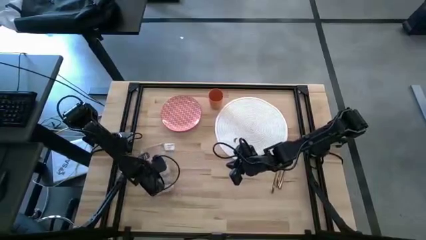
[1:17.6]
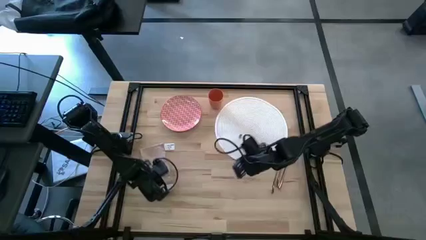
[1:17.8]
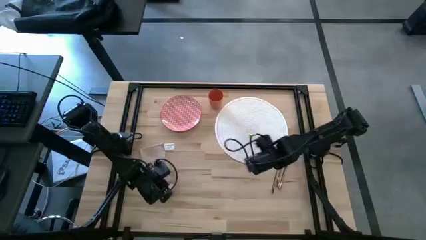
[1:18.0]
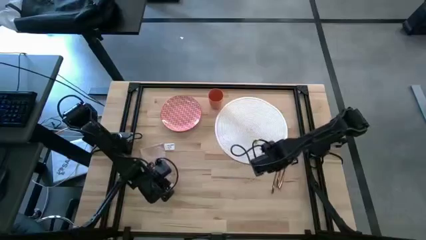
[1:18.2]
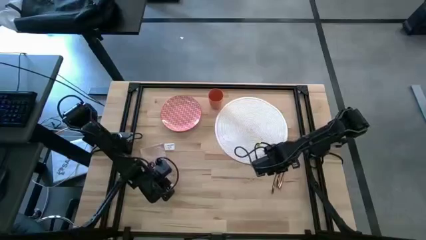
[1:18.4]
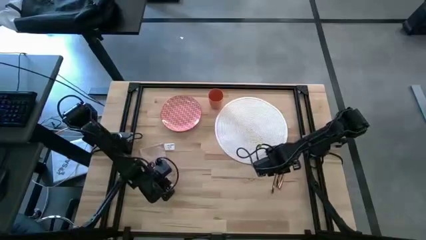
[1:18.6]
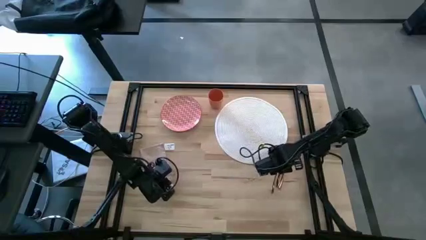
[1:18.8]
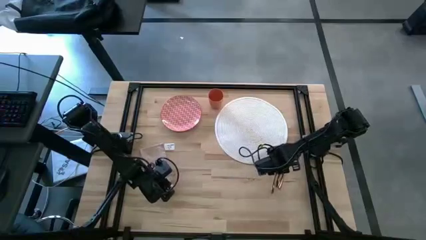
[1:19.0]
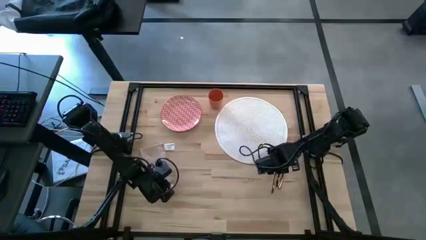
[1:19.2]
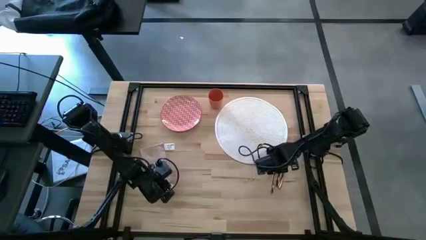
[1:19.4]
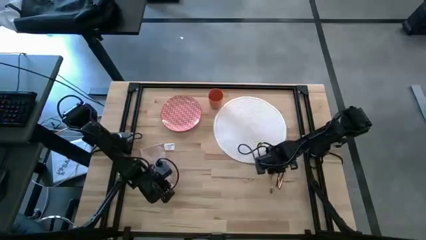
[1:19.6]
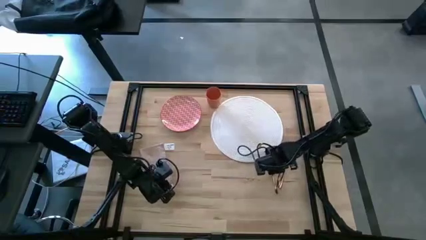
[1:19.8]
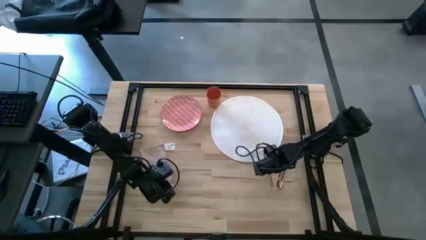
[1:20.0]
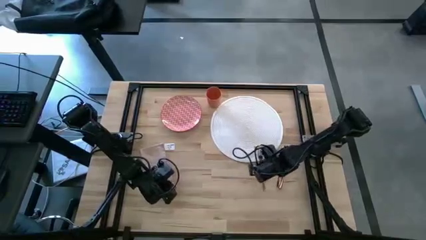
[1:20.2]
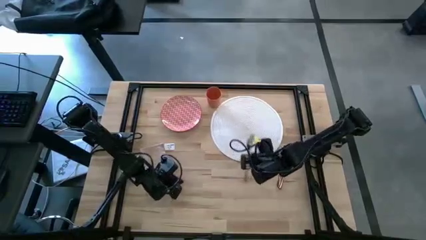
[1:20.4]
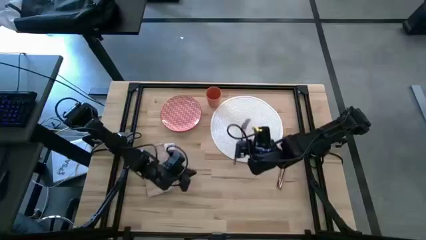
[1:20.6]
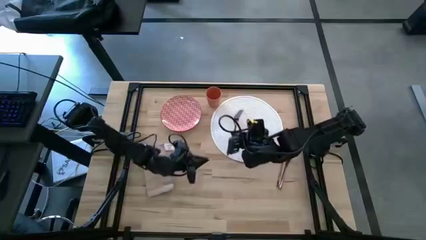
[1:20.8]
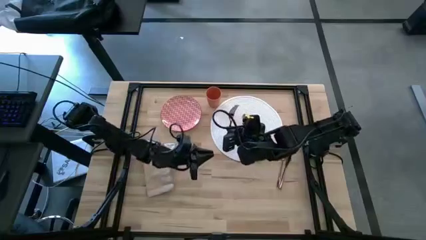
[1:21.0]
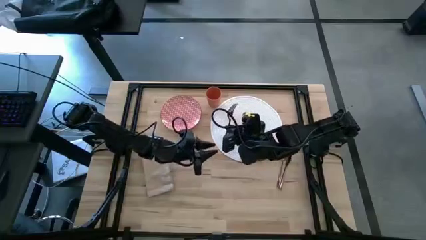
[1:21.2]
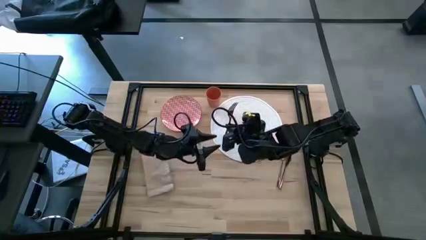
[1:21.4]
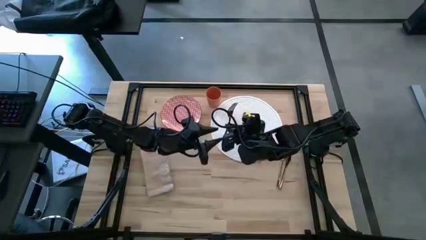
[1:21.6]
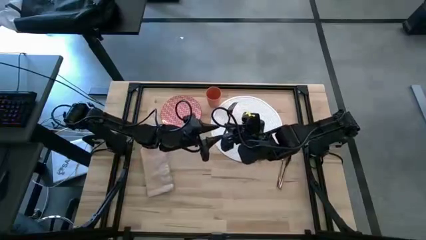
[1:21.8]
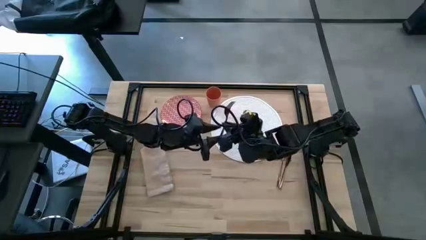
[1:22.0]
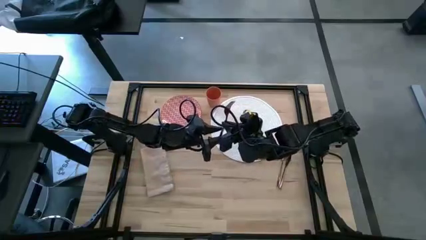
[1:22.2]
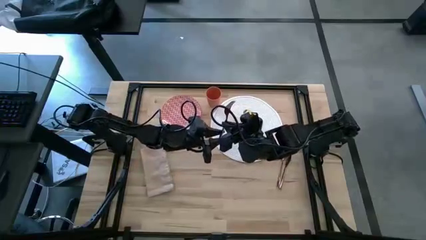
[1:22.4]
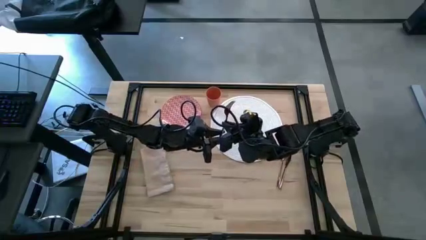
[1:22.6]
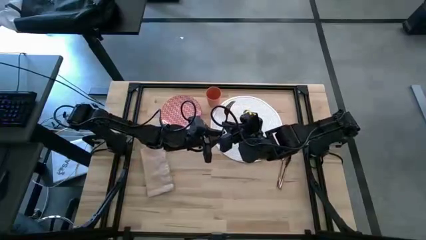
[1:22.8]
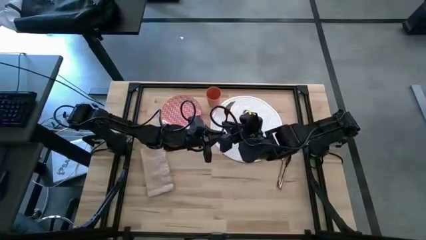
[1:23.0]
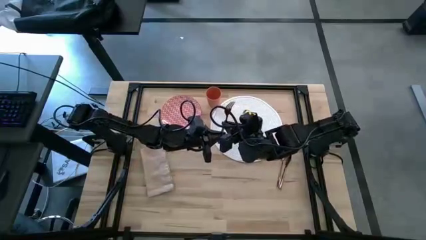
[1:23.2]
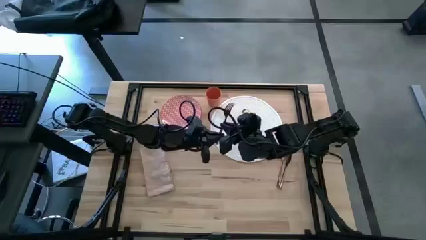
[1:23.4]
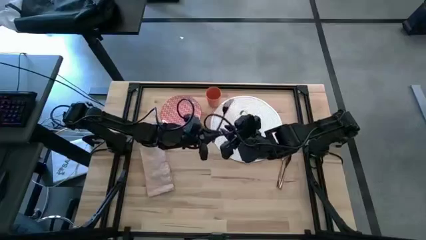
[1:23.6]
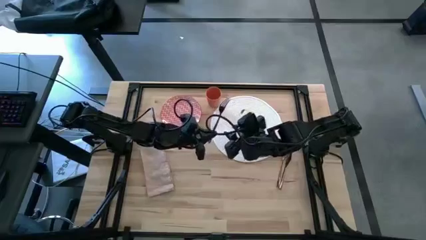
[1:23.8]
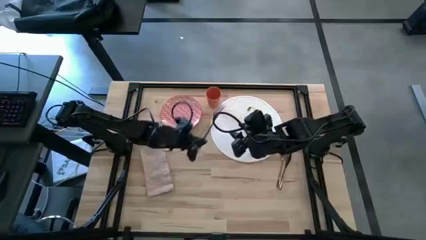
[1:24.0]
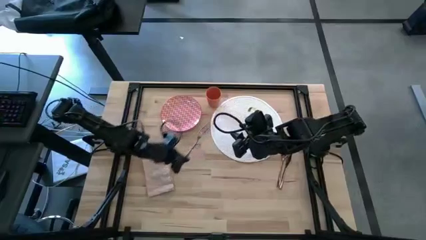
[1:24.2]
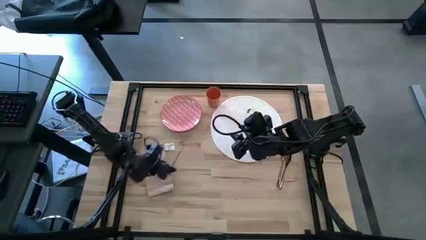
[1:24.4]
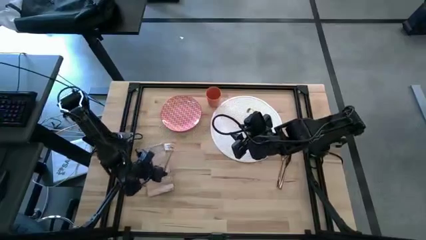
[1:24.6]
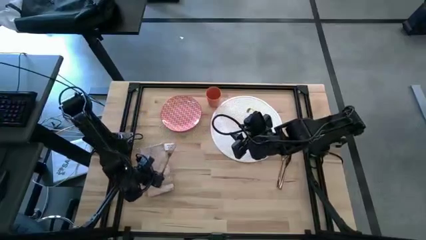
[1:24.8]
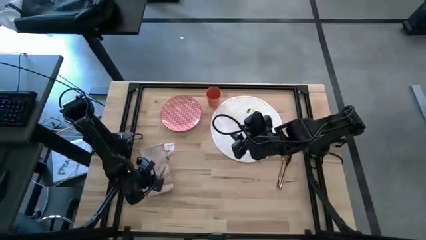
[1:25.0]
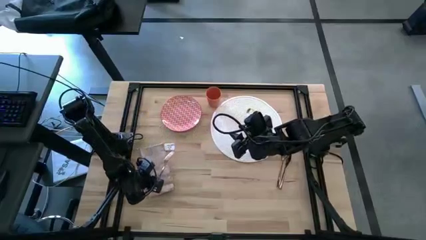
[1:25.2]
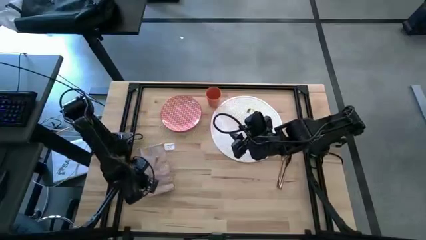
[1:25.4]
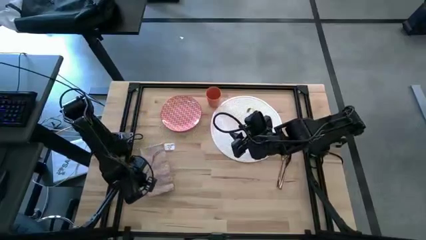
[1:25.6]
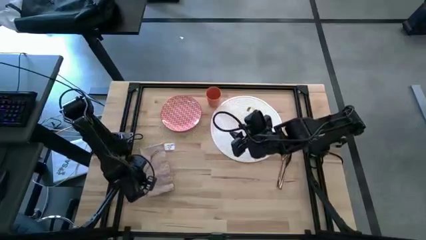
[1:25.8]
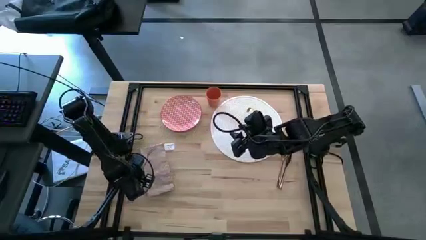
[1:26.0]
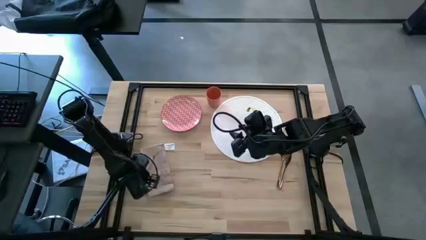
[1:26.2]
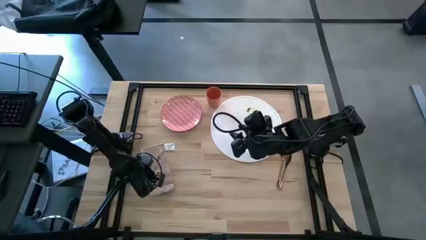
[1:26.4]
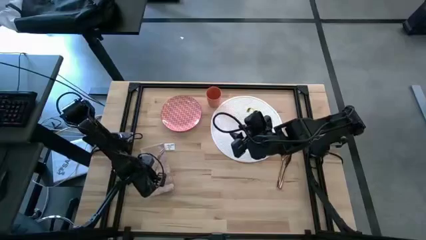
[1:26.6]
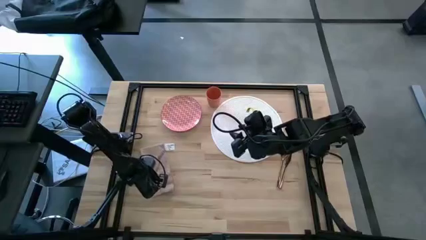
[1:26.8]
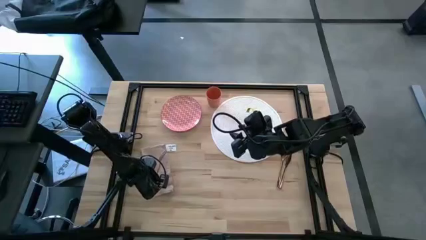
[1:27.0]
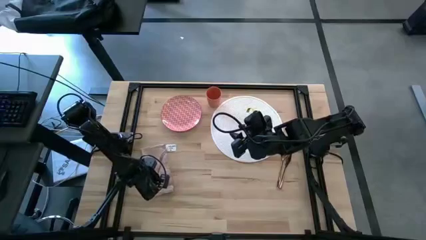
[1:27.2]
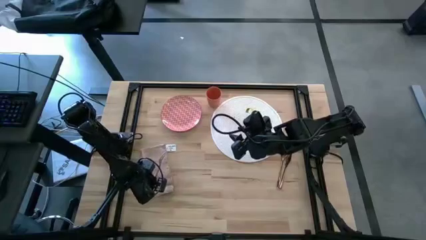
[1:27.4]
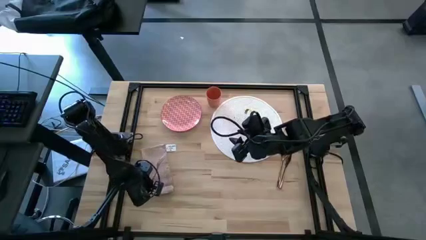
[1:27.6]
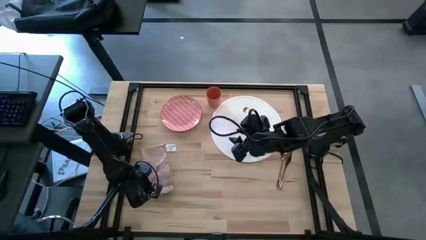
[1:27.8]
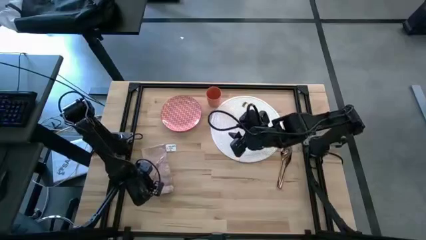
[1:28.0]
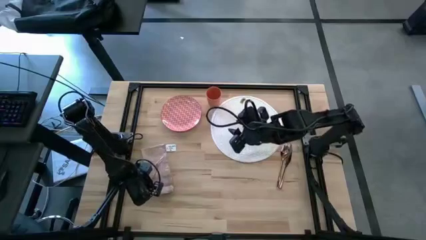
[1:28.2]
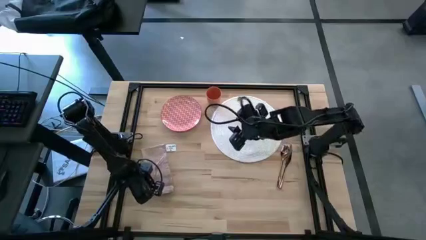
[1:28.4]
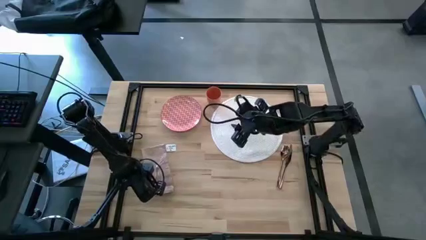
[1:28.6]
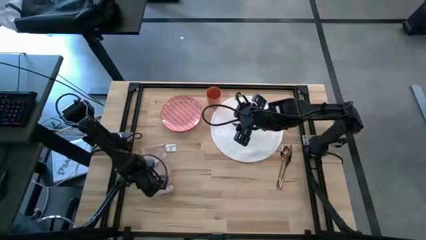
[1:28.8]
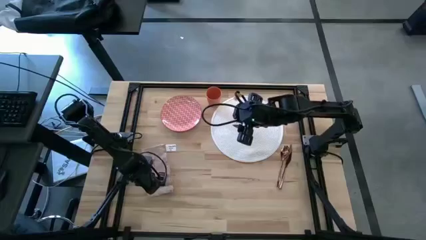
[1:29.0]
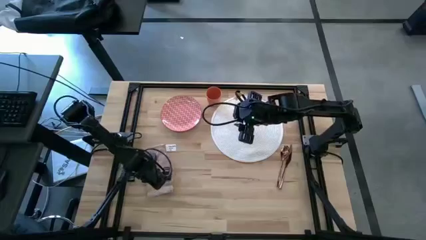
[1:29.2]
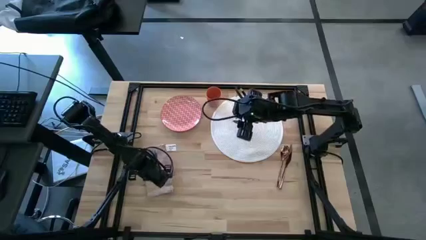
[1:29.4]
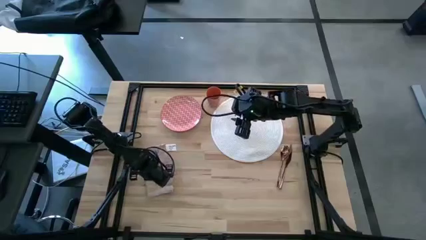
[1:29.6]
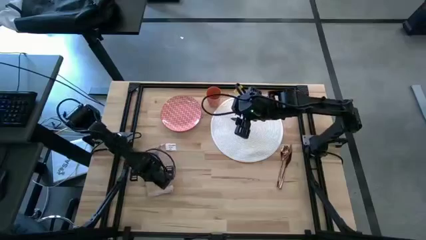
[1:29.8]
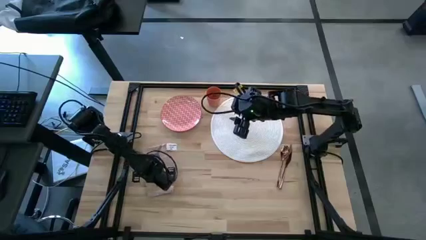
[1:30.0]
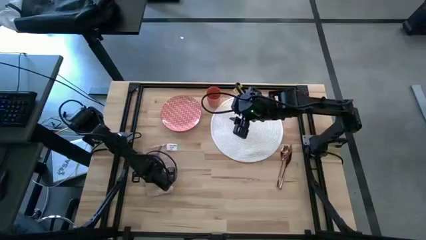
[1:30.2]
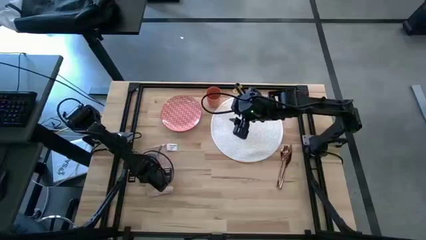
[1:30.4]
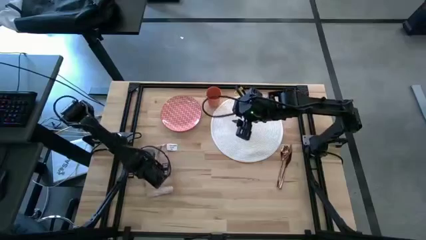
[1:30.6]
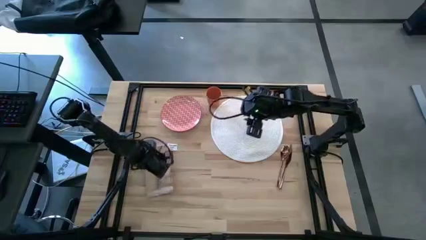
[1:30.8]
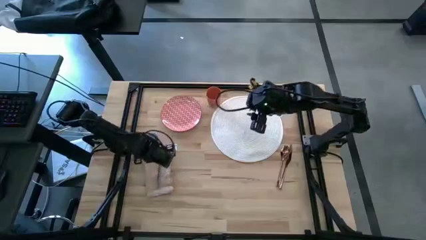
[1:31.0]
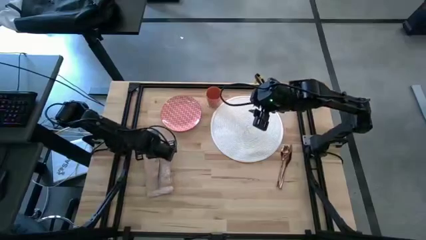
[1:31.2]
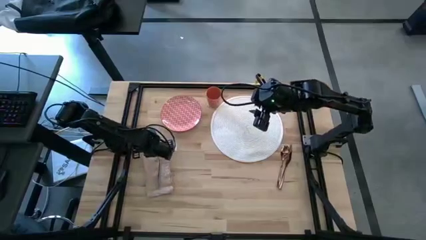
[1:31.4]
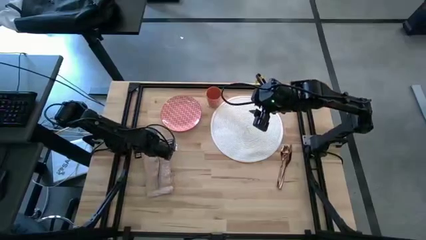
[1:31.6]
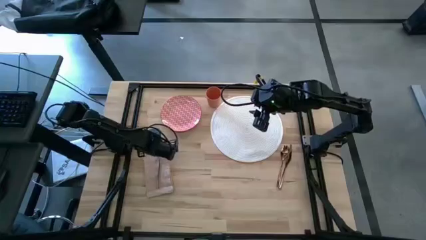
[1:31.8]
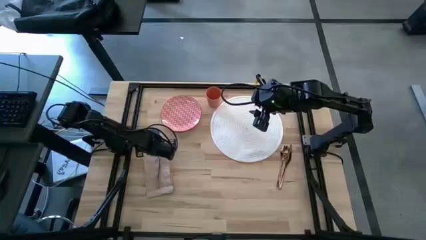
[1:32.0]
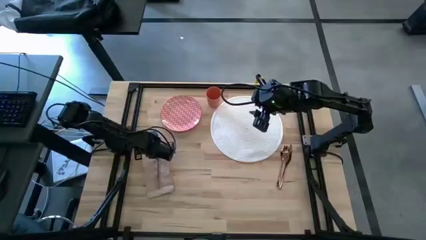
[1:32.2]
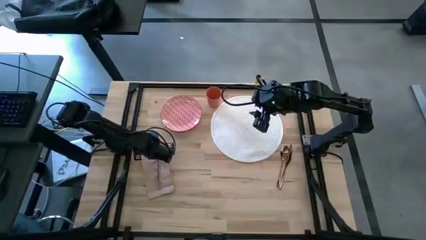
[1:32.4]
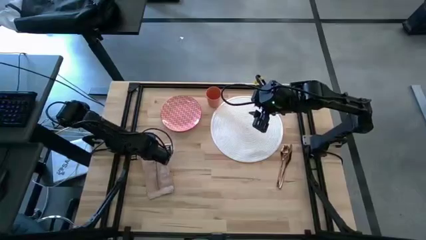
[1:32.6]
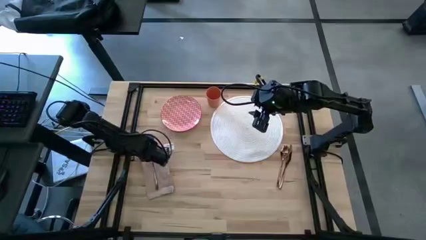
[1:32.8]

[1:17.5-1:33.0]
Task: Set table place
Put the gold fork on top of the pink napkin

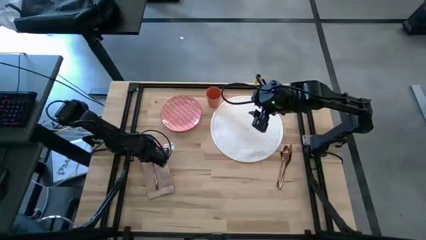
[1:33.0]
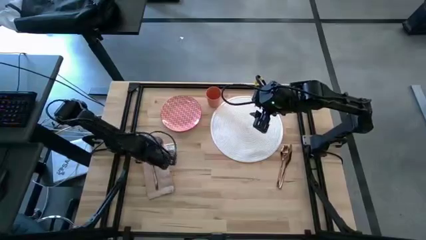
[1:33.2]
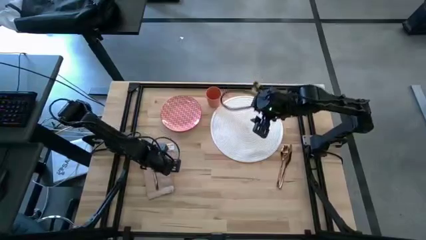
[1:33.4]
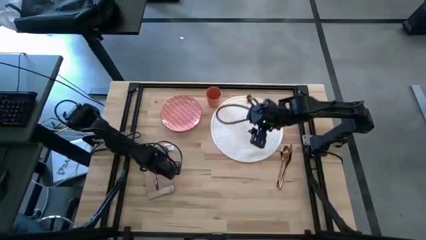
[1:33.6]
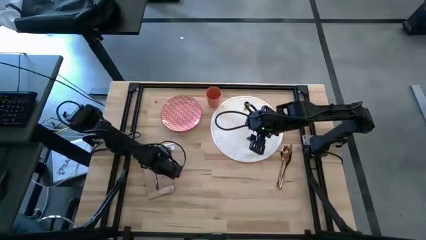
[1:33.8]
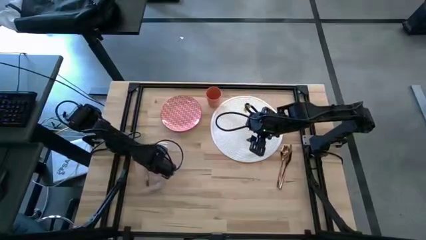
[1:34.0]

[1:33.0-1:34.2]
Adjust the pink napkin
